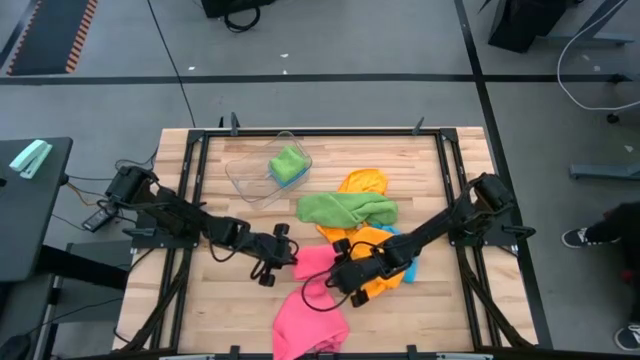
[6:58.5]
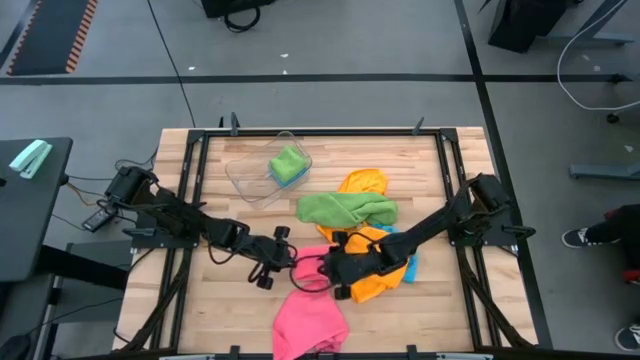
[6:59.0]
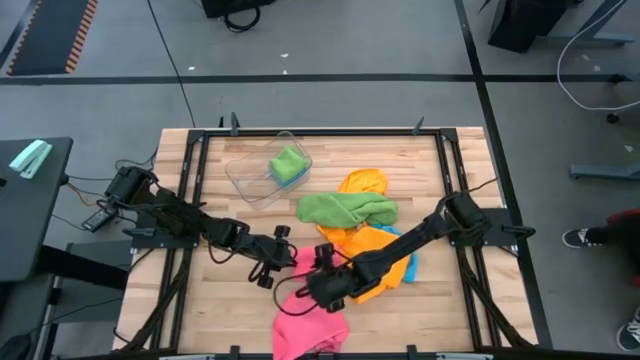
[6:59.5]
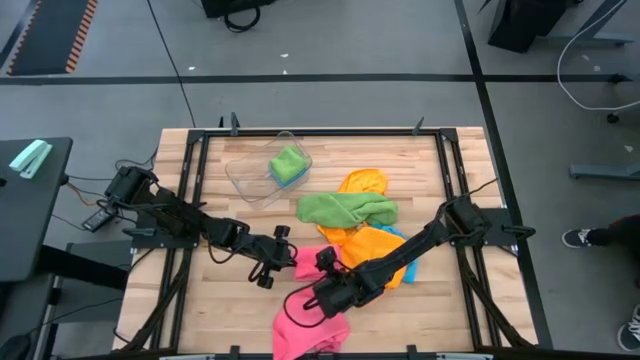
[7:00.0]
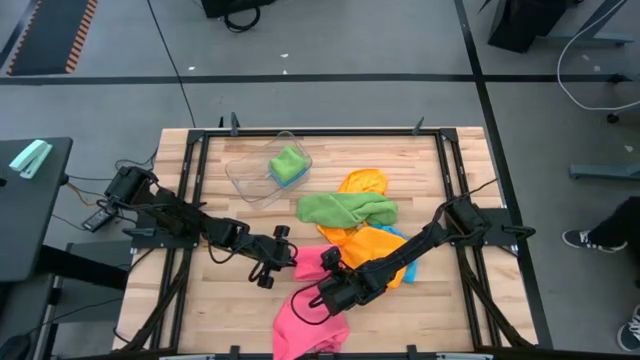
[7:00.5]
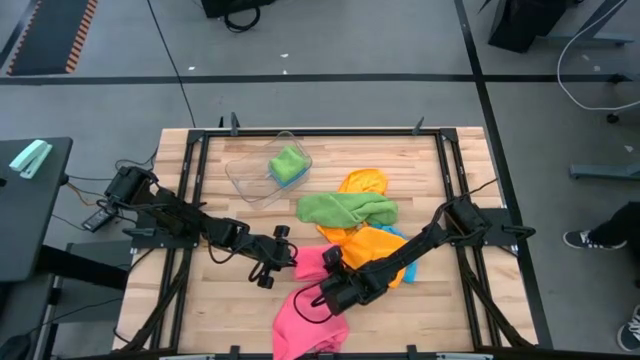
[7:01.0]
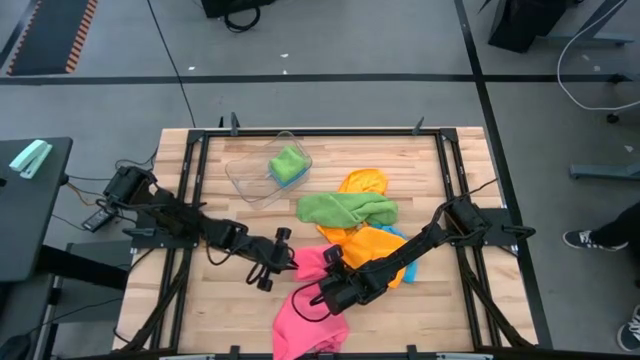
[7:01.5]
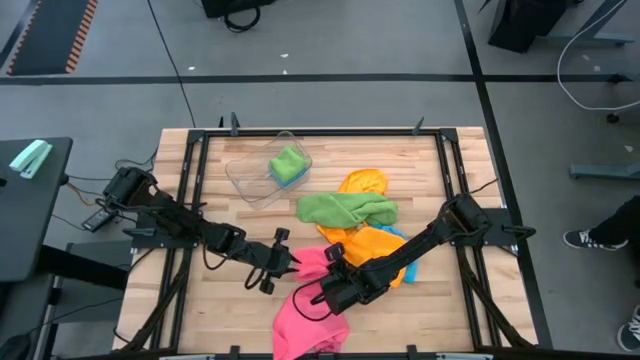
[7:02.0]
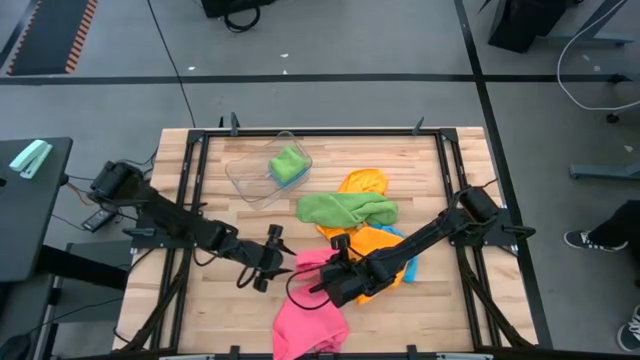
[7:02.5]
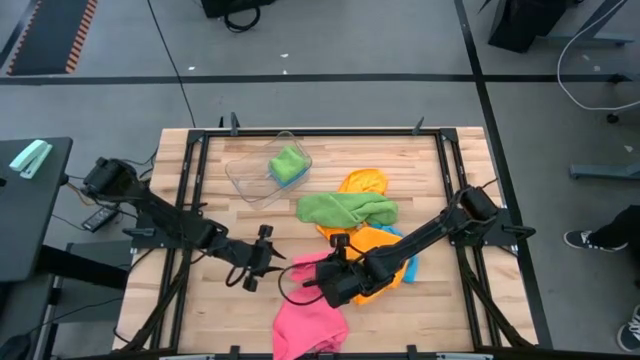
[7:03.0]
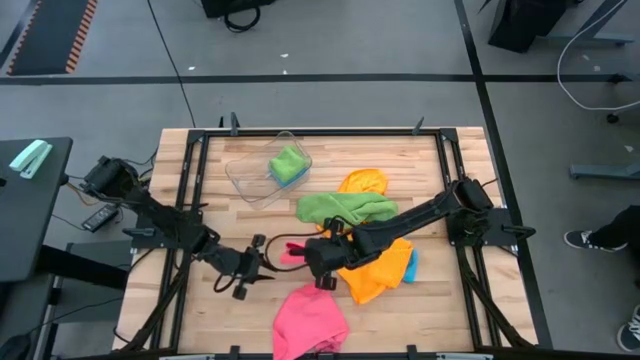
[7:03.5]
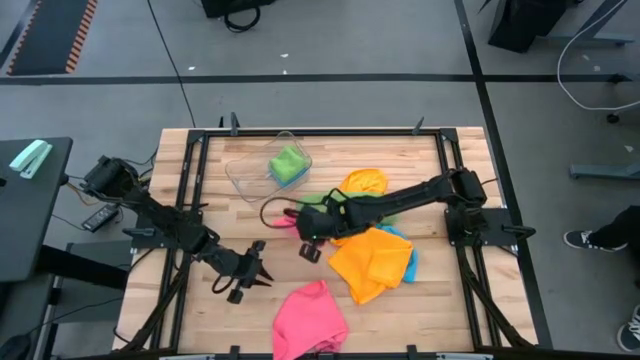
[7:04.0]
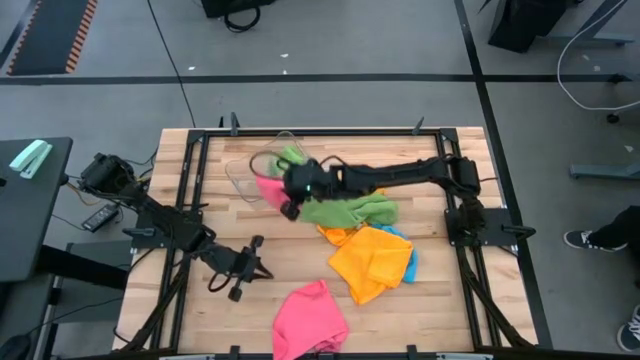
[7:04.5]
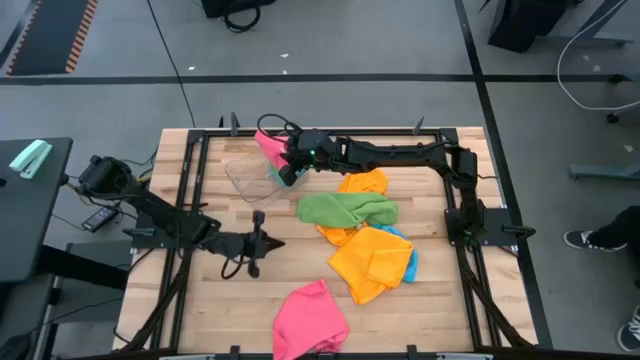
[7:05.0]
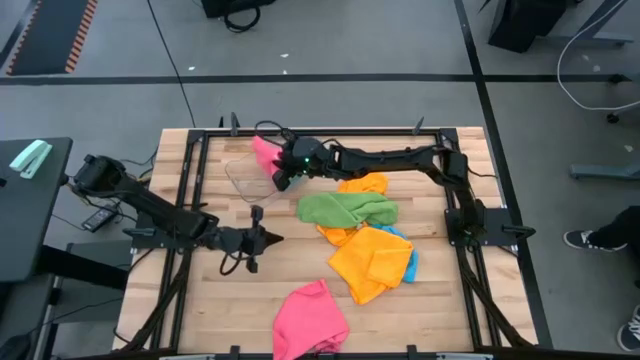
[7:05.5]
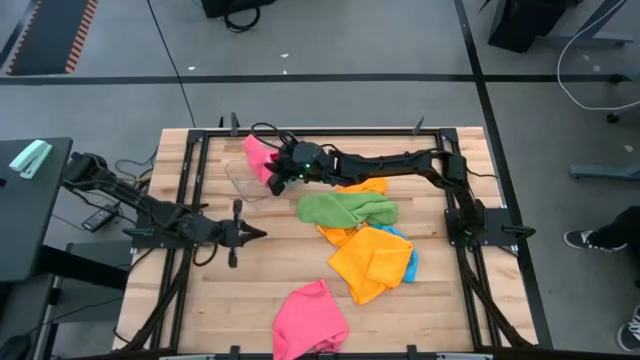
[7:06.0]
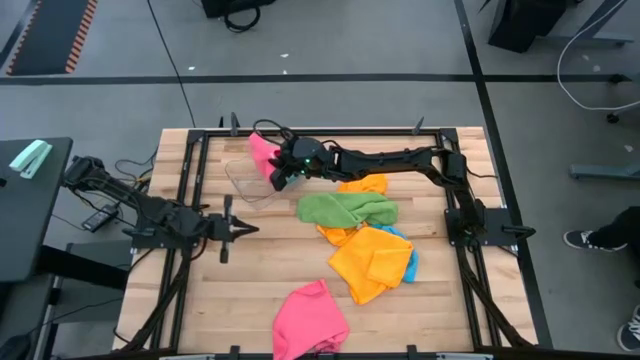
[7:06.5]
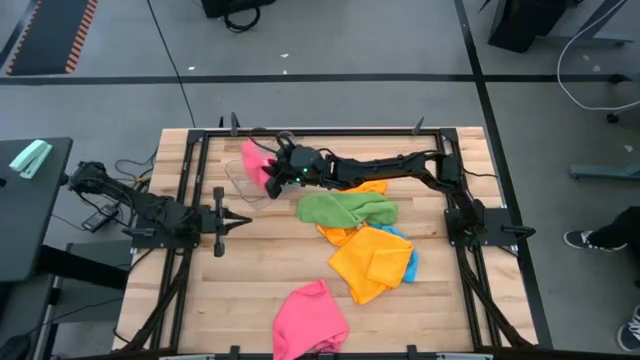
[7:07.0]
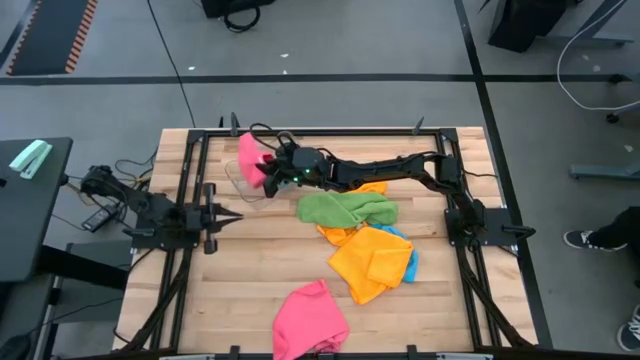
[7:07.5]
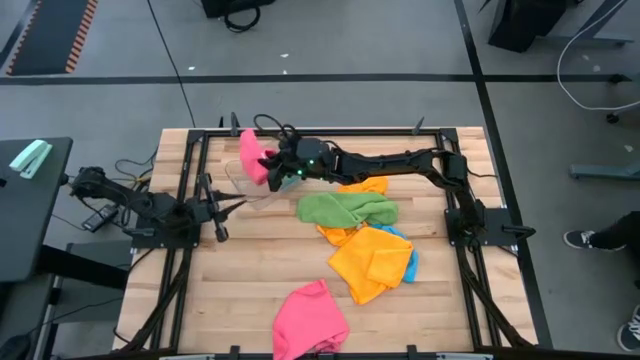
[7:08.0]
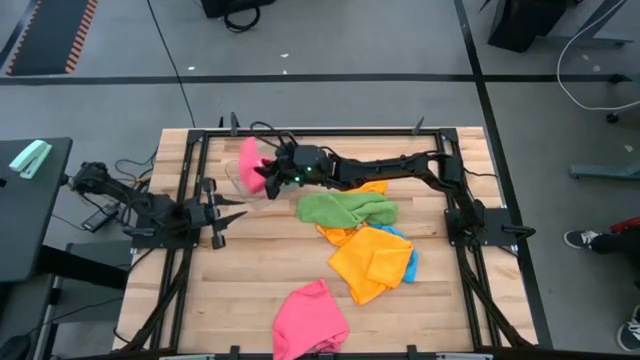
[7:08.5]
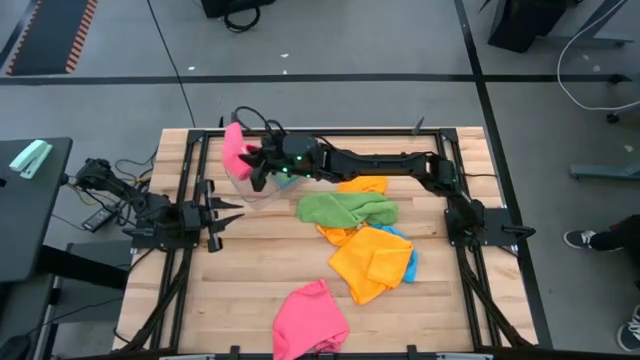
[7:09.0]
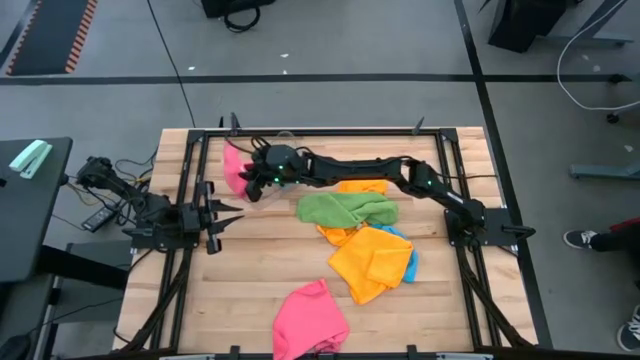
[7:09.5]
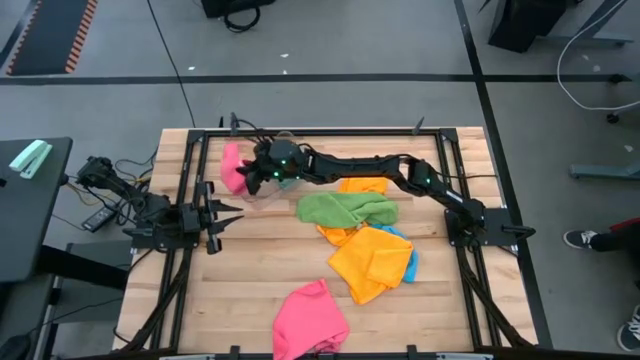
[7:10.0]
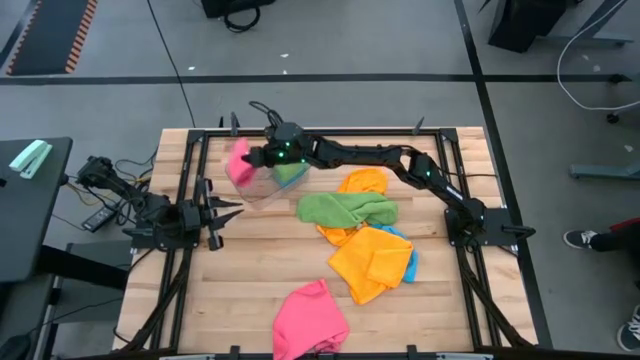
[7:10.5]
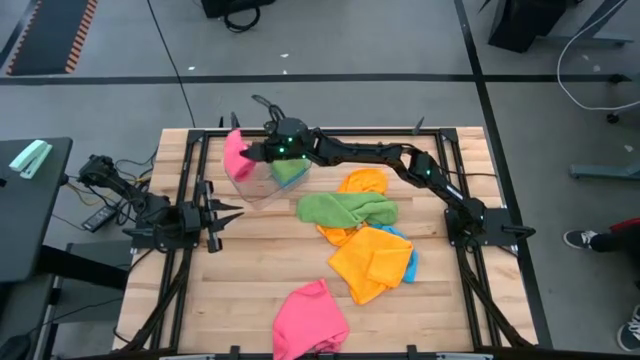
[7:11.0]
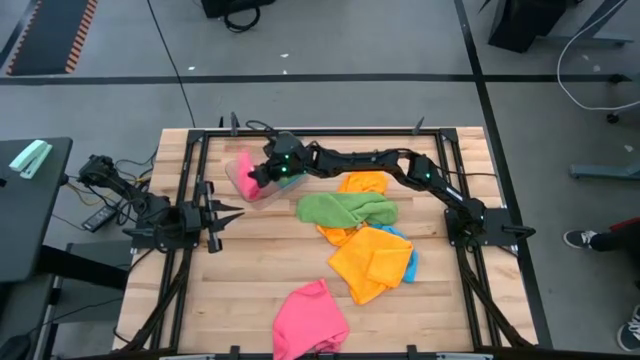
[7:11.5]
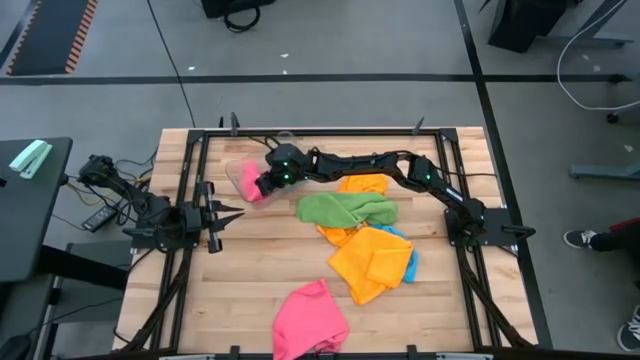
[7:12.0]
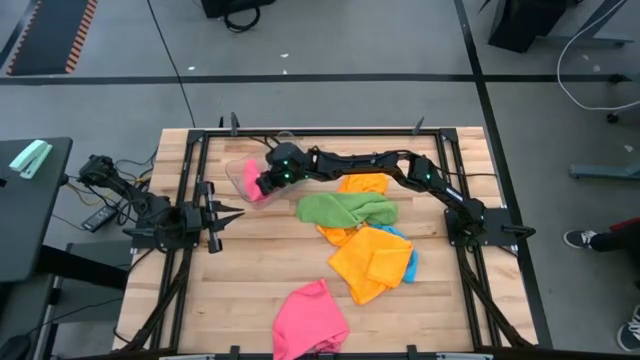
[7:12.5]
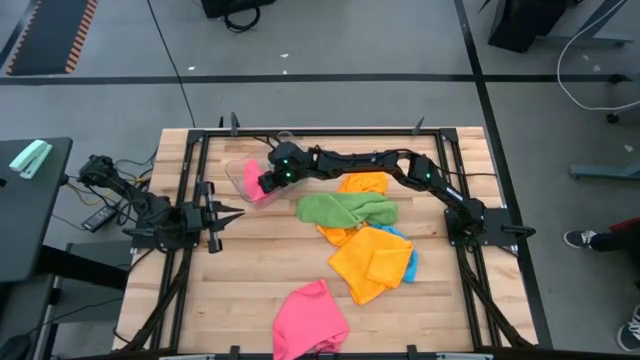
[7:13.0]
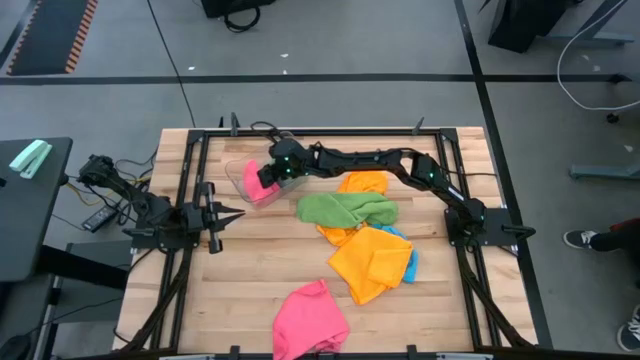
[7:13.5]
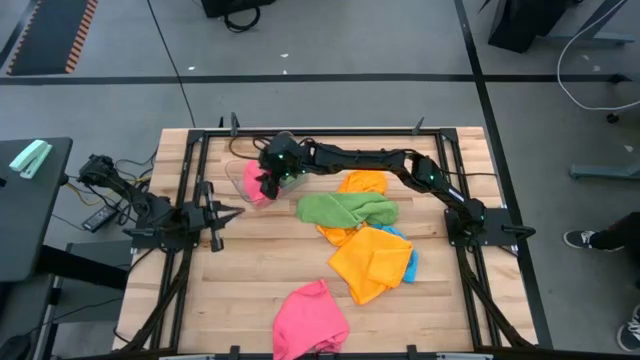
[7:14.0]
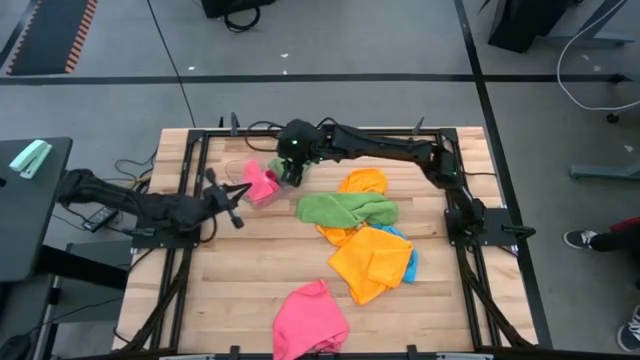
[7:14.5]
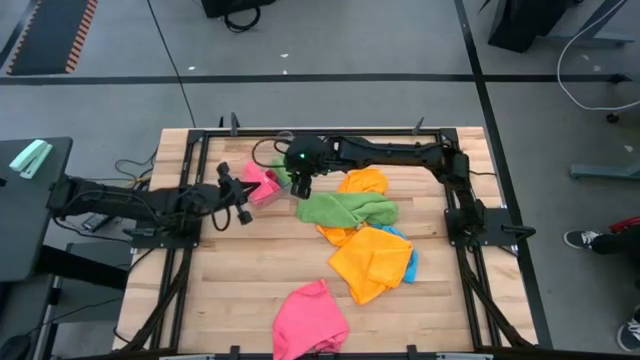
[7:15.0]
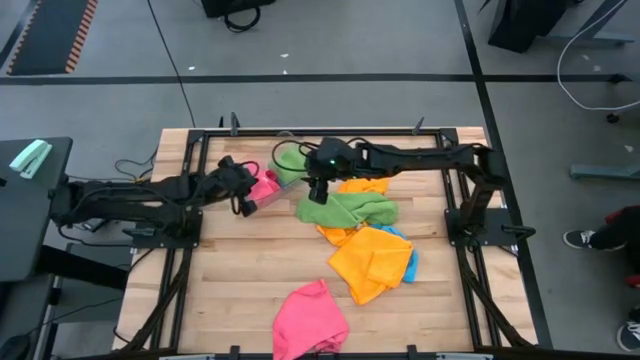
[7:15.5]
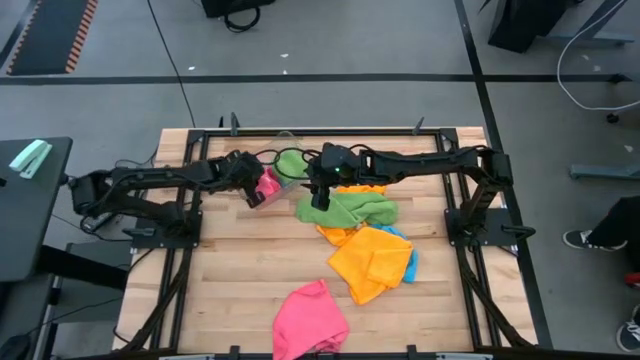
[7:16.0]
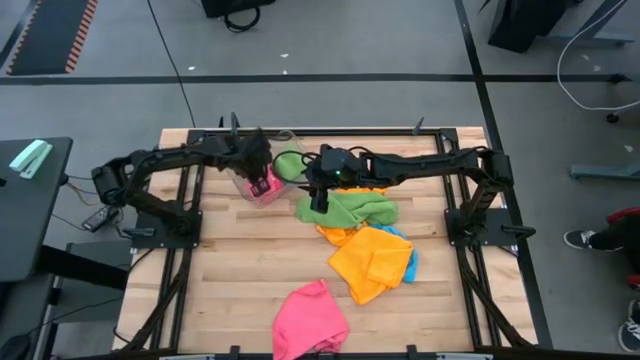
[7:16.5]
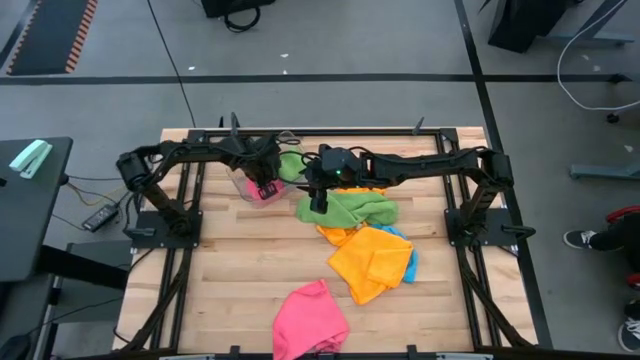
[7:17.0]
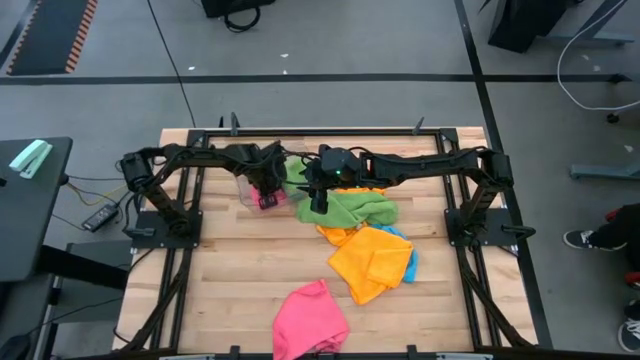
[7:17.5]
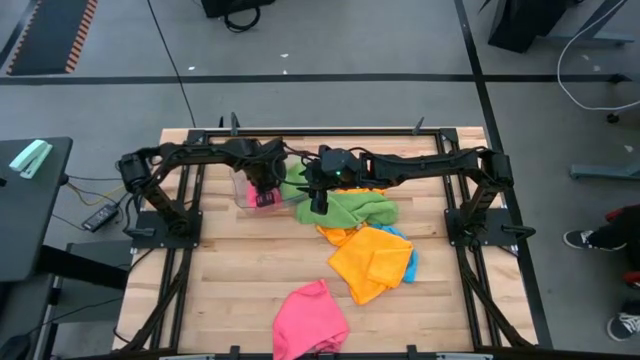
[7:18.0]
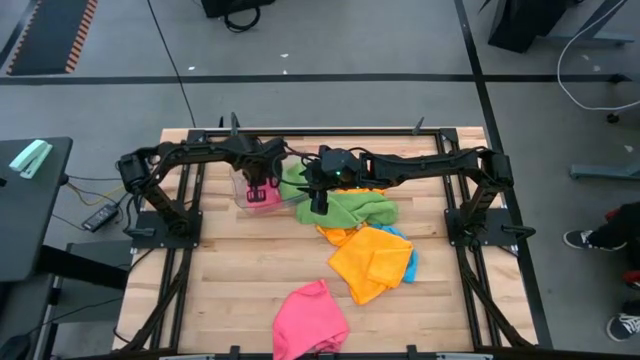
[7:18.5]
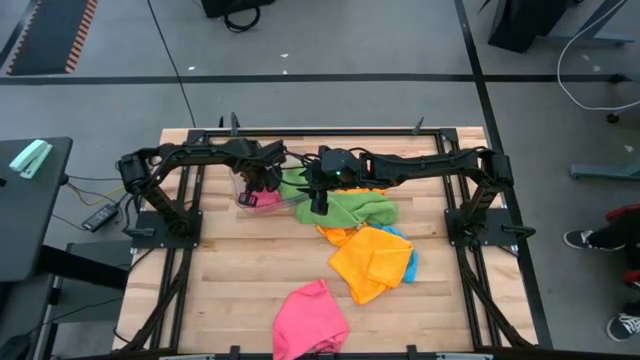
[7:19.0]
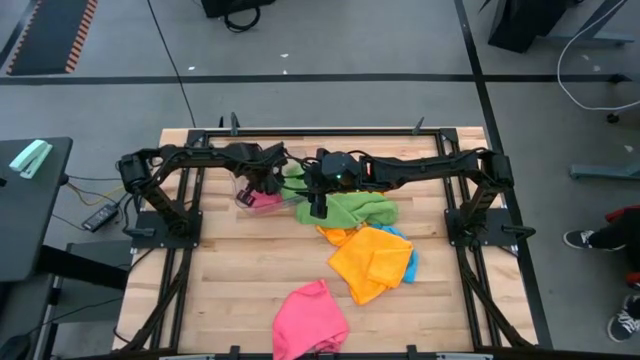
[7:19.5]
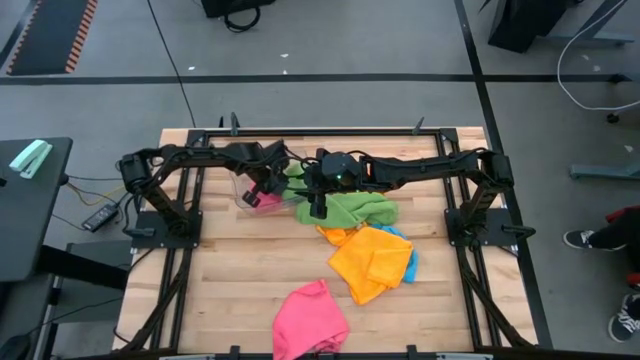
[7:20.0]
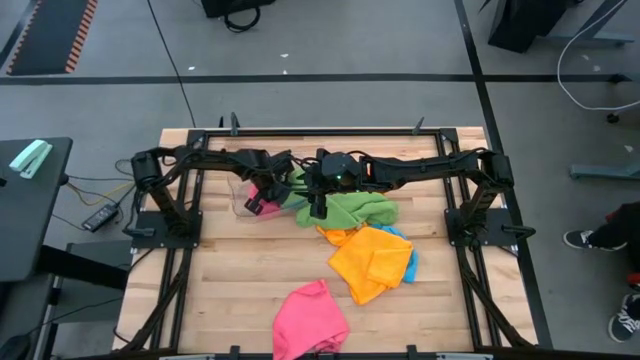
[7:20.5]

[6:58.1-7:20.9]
Task: Fold microfiber towels
Put the left pink microfiber towel into the transparent bin
